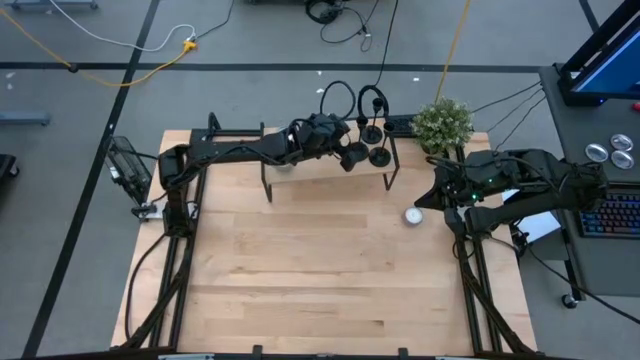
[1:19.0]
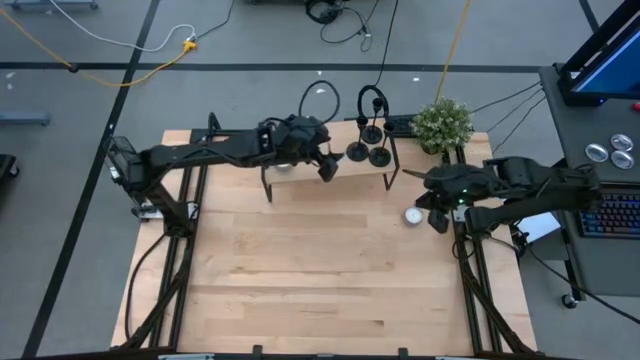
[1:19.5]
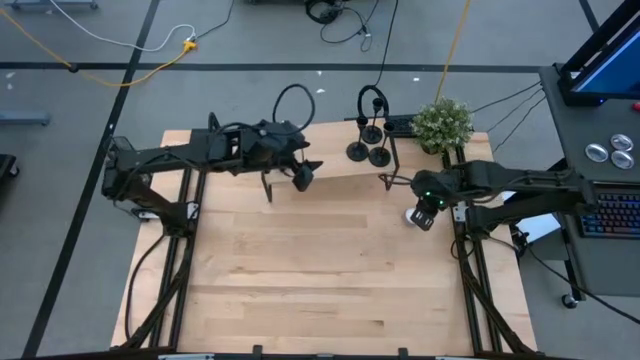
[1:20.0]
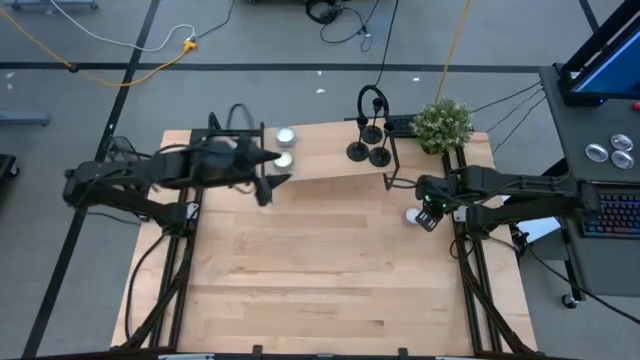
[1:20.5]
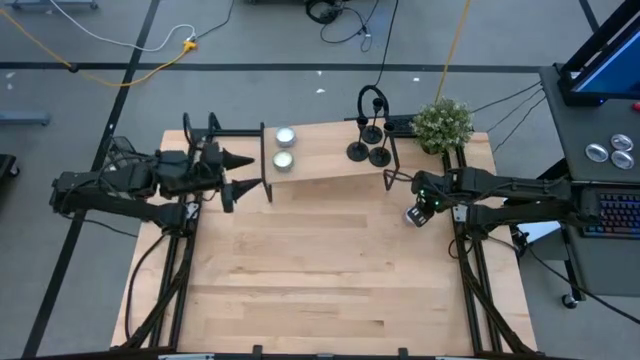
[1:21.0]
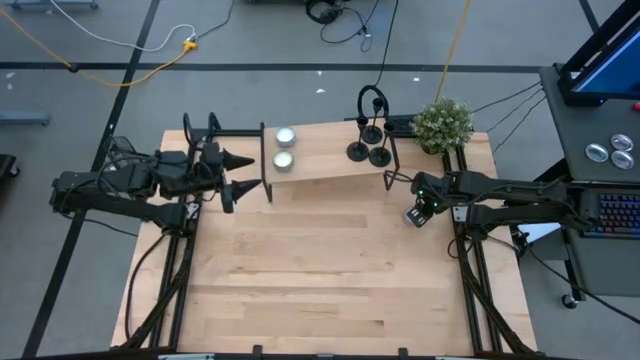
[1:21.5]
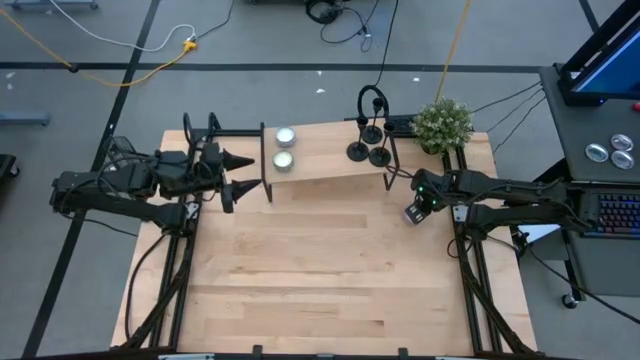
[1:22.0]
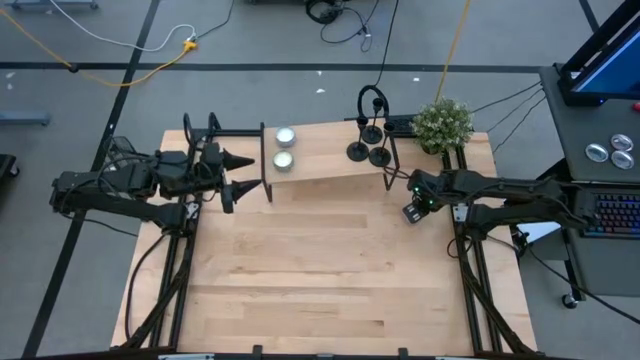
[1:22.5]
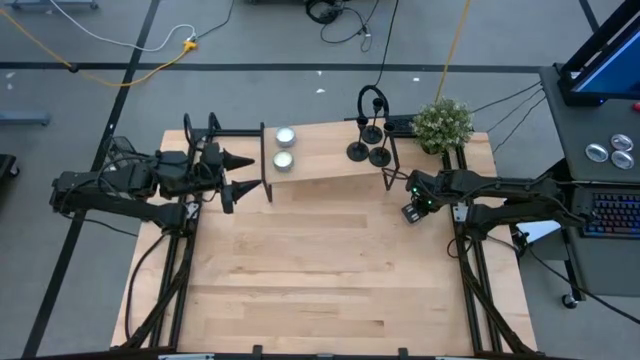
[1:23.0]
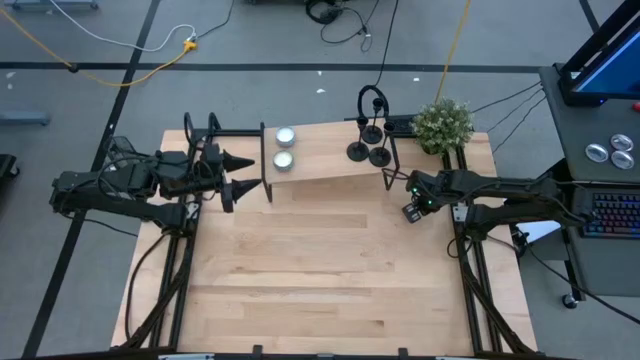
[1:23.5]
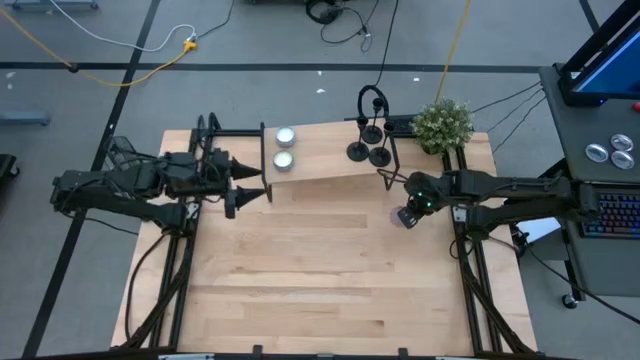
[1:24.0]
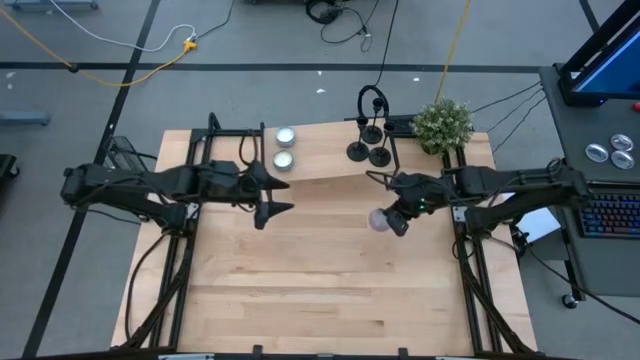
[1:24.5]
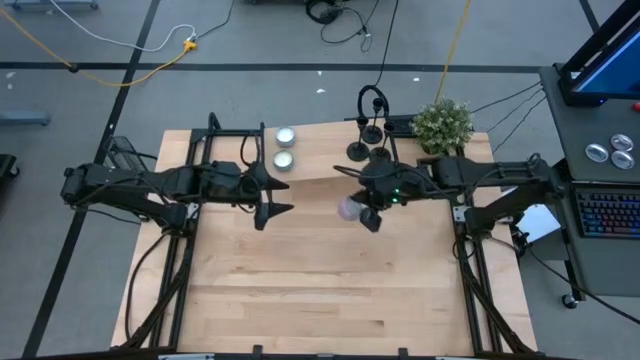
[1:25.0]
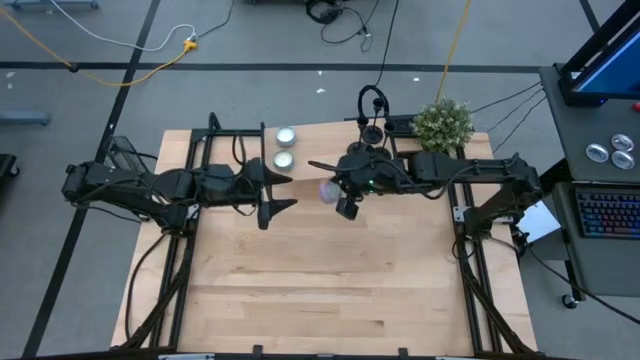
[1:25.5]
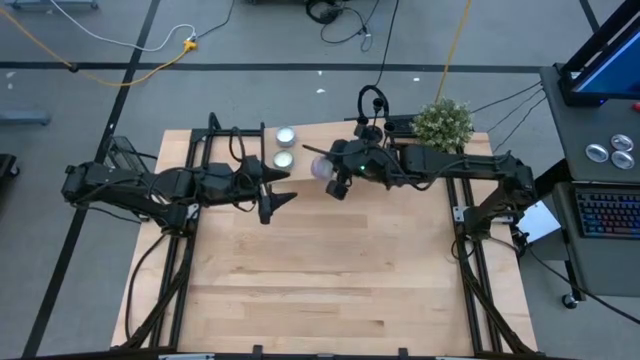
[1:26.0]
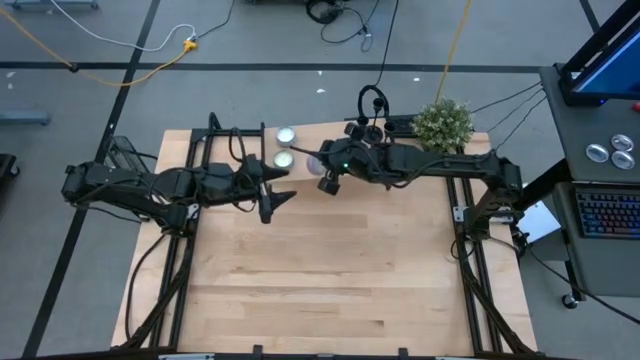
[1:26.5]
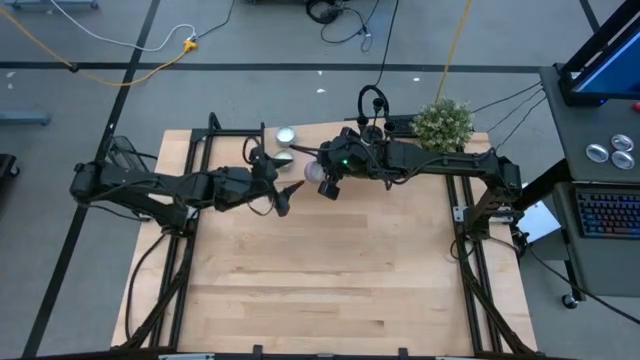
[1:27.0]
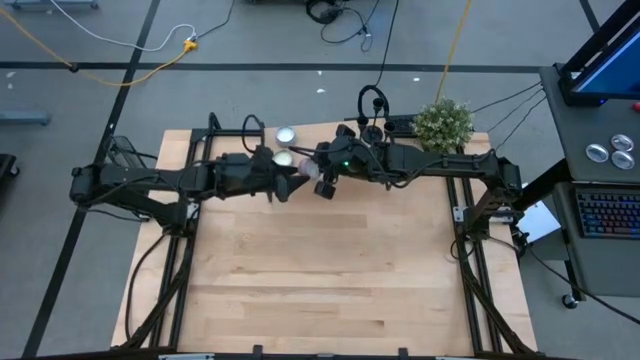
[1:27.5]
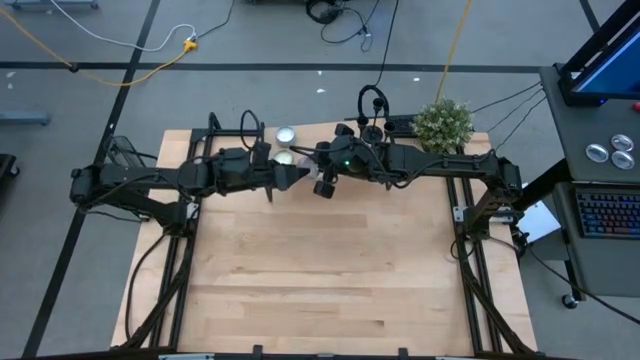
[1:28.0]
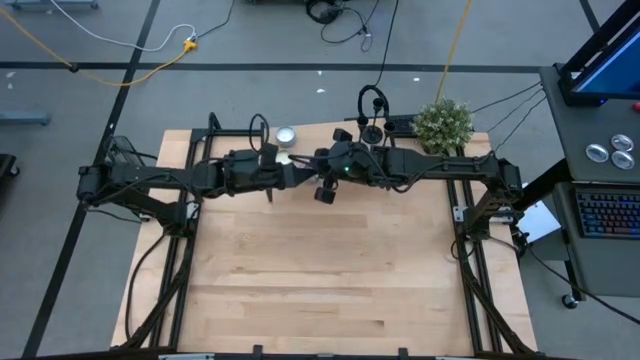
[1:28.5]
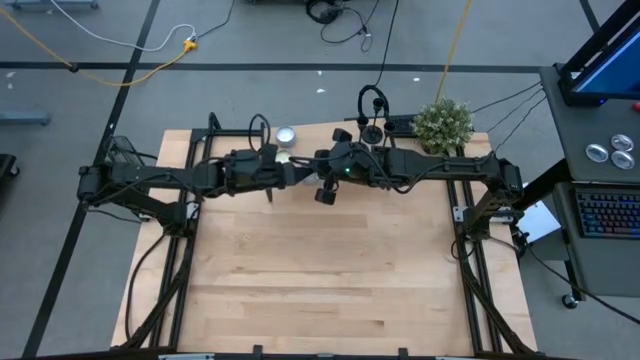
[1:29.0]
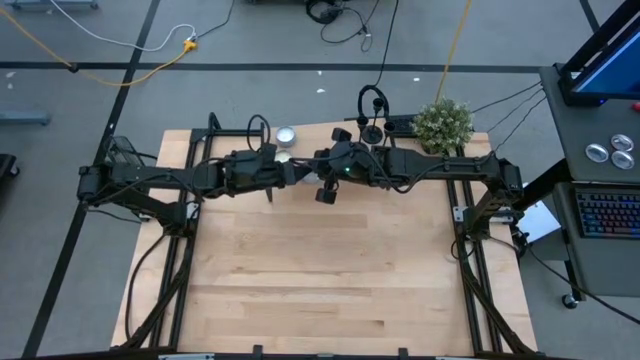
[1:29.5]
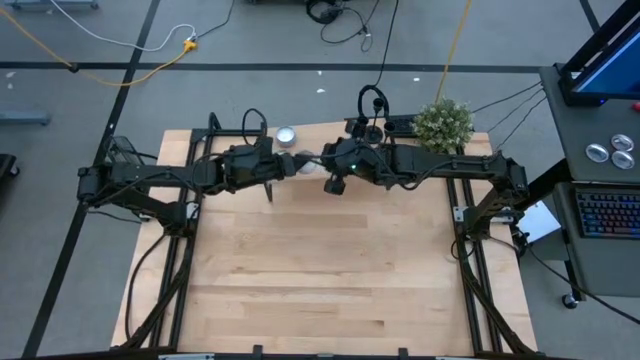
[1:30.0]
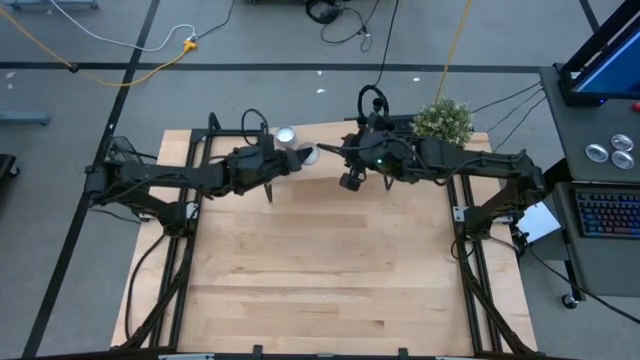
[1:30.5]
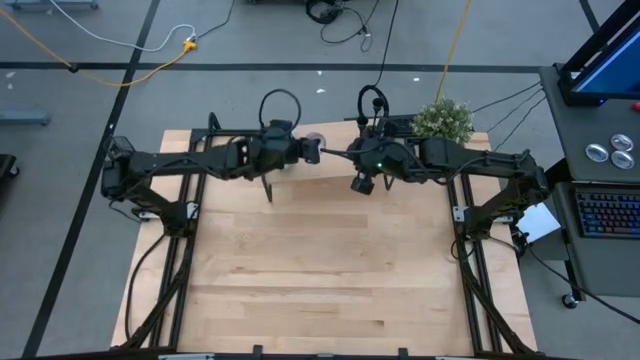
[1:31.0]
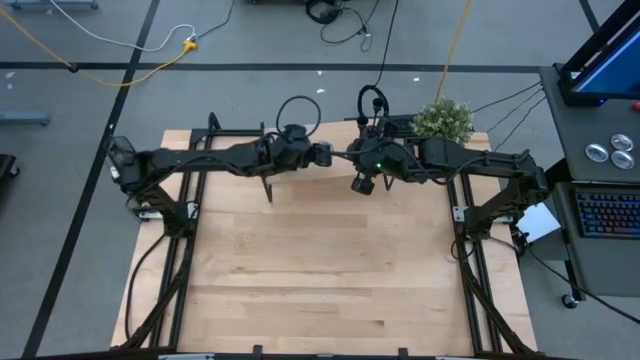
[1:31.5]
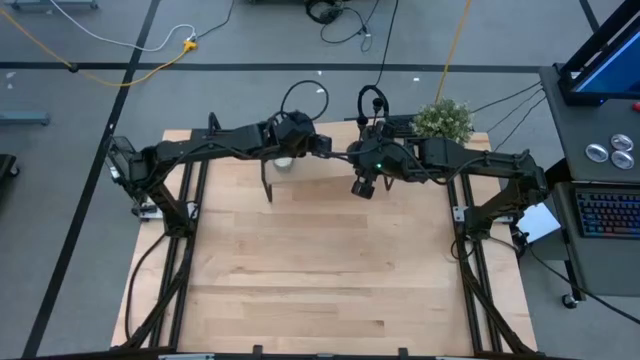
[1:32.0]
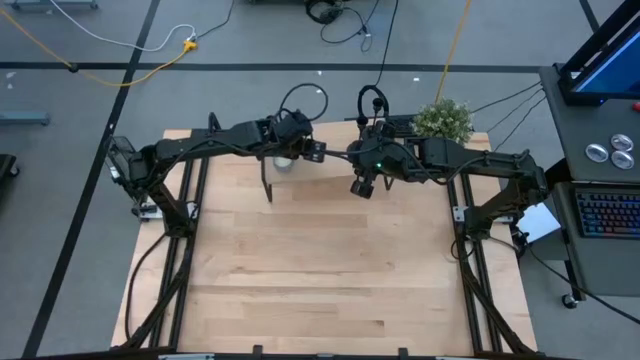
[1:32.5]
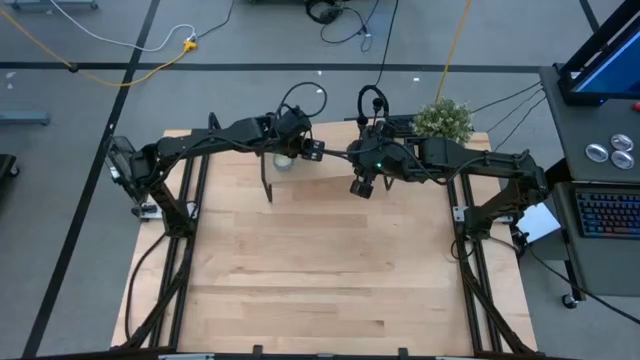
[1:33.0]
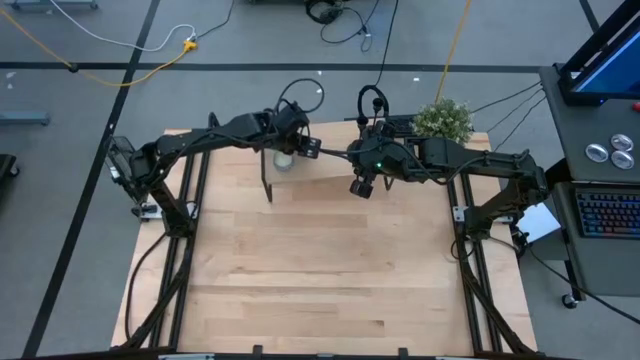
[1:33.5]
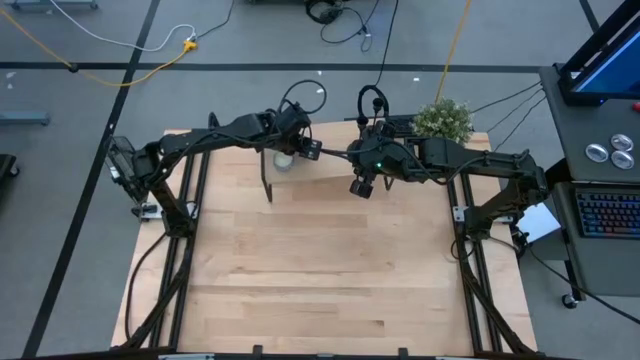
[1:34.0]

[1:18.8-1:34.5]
Task: Pick & Place candle stick holders
Put the pink and blue scented candle on the shelf

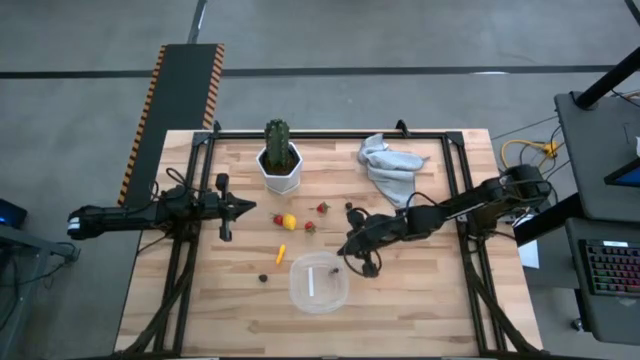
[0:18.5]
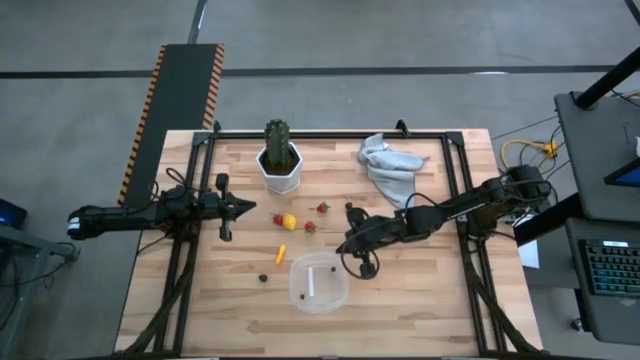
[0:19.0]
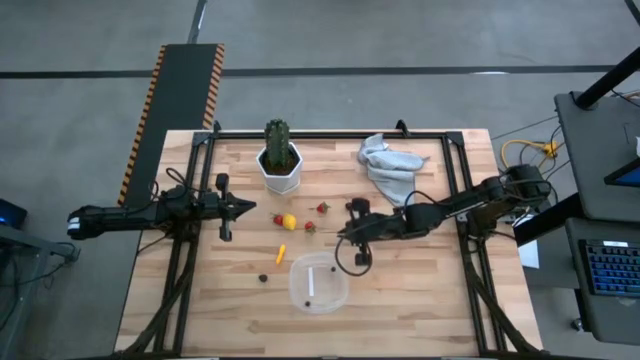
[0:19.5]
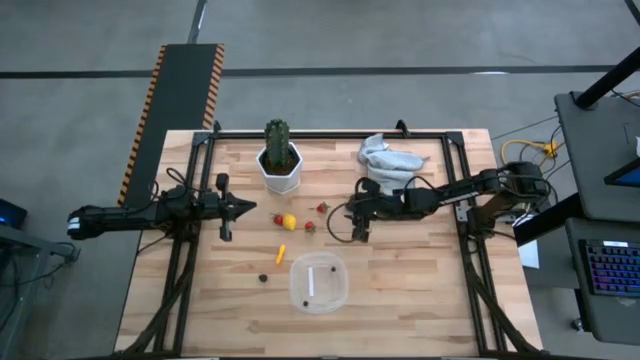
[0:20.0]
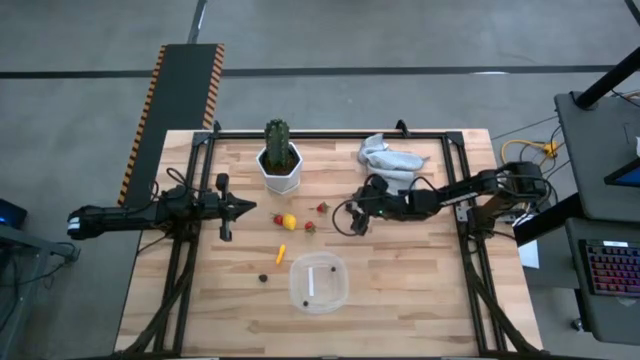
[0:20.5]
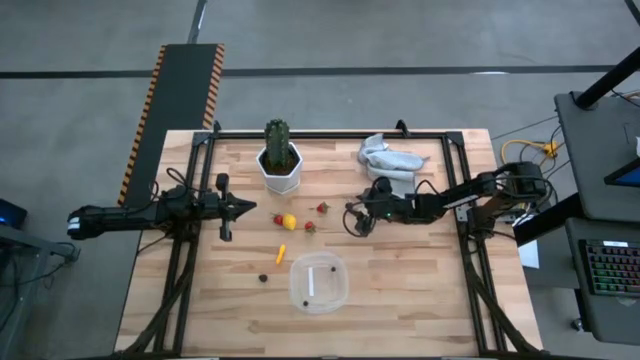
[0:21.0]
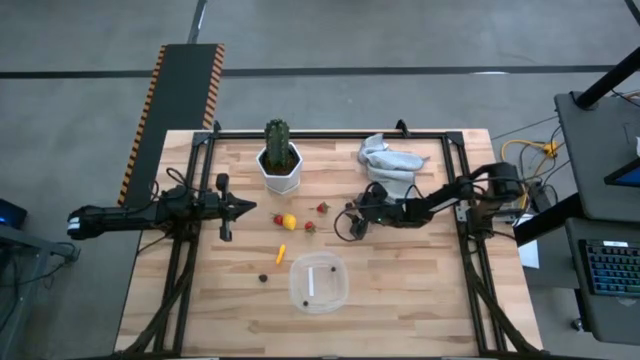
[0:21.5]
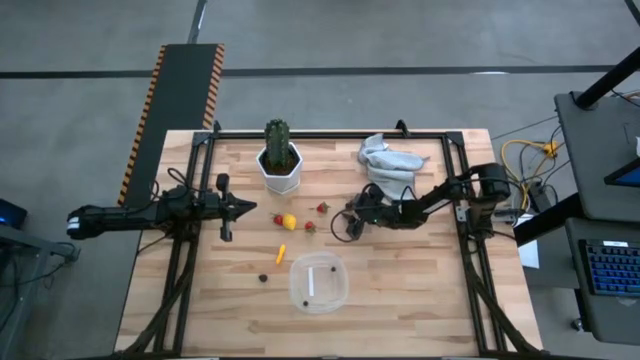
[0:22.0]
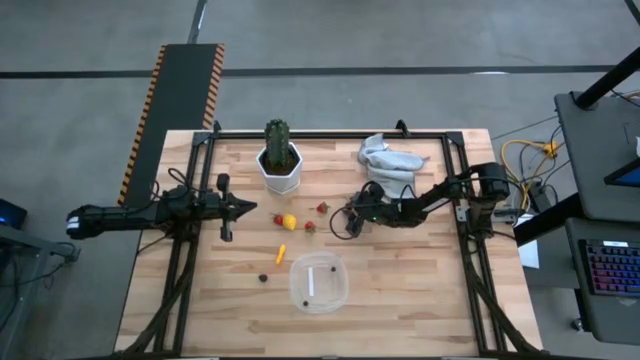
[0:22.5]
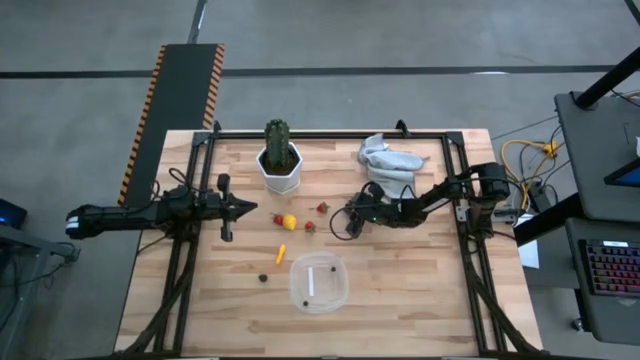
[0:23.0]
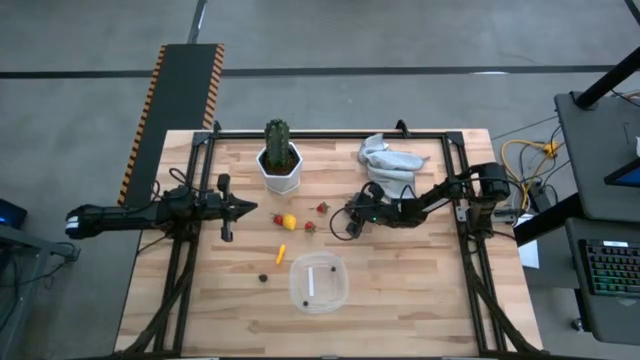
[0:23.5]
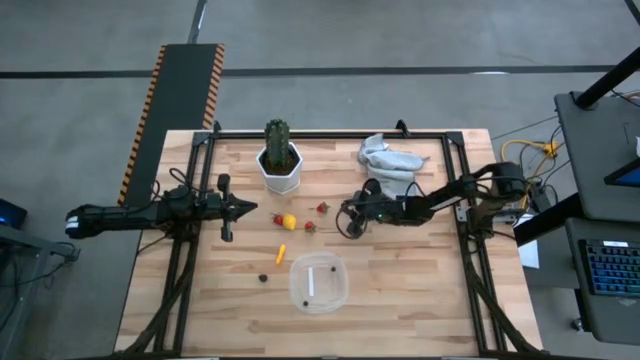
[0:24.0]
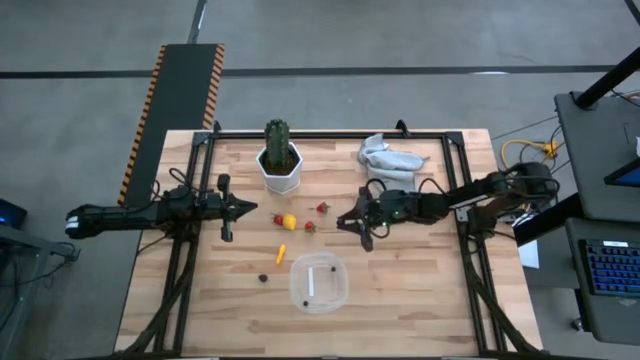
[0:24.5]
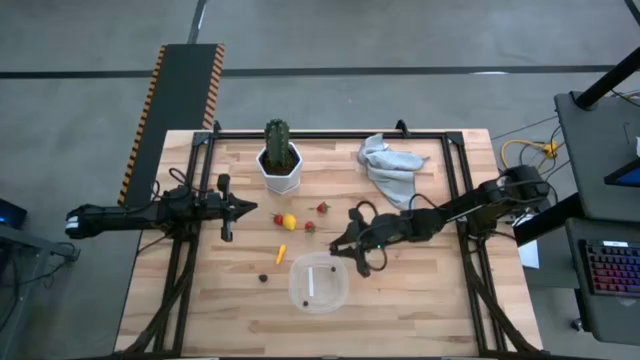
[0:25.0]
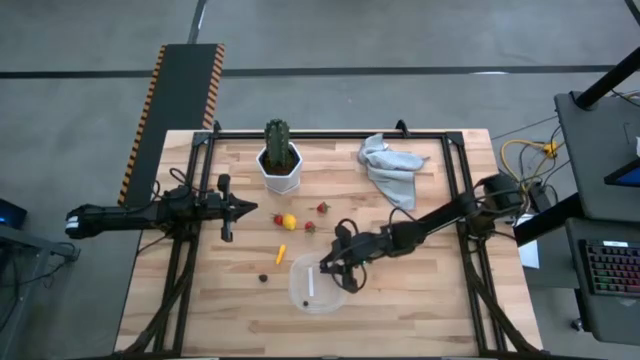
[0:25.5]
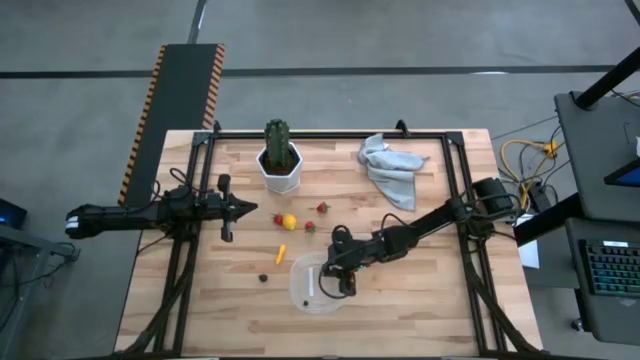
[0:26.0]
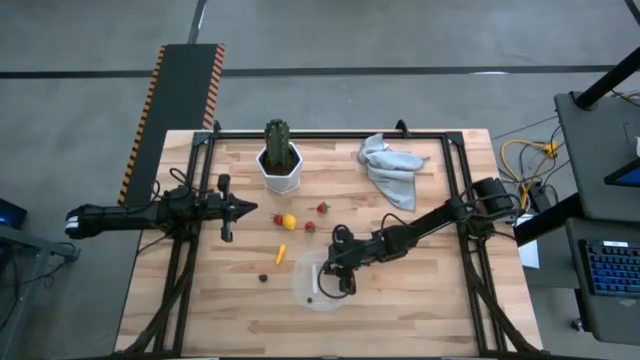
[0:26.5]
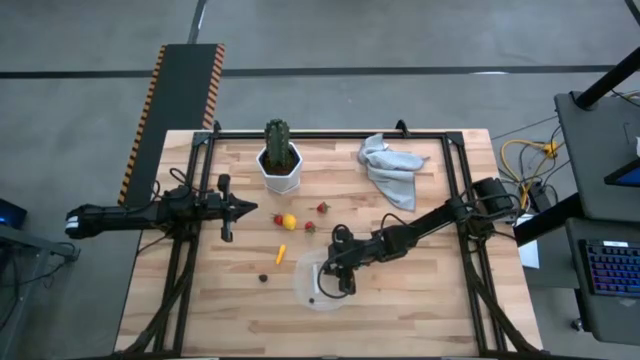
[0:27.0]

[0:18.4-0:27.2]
Task: Pick and placing Produce into tupperware
Put the black cherry into the transparent container
